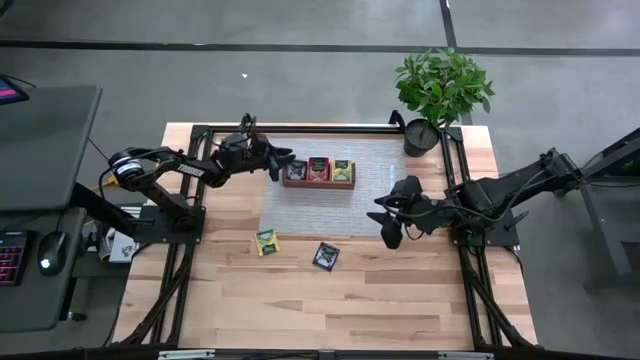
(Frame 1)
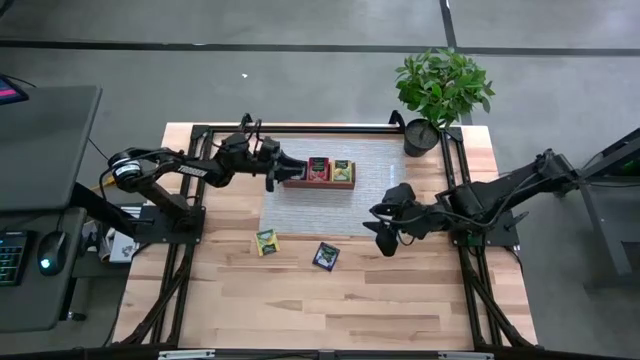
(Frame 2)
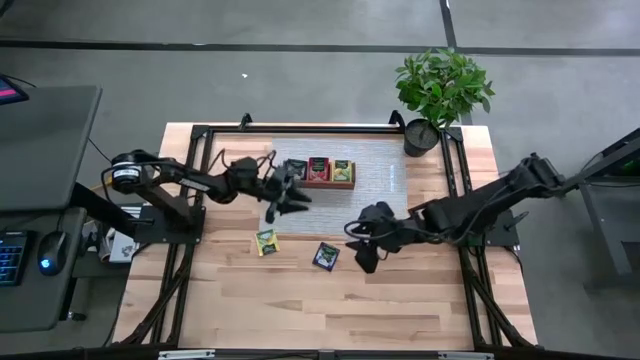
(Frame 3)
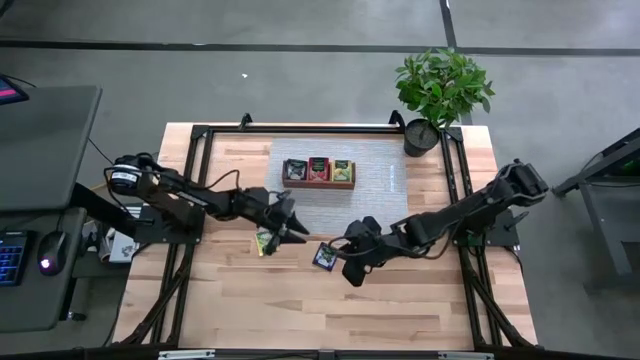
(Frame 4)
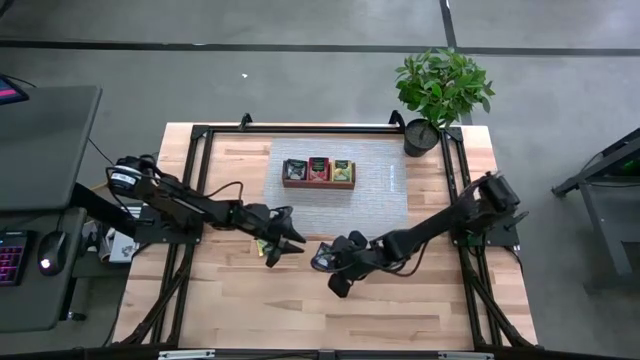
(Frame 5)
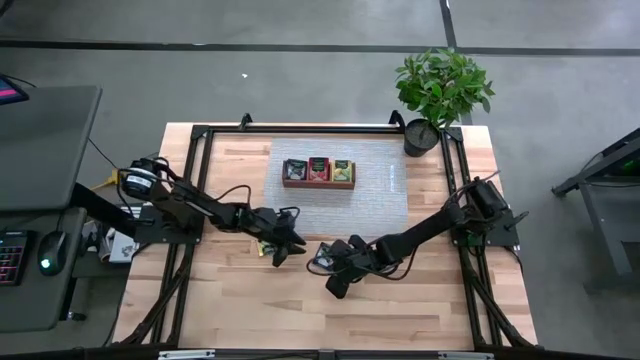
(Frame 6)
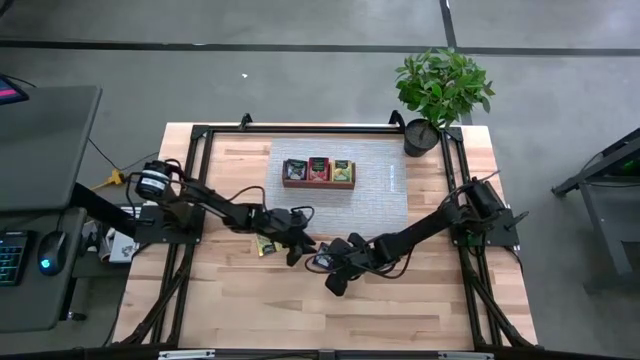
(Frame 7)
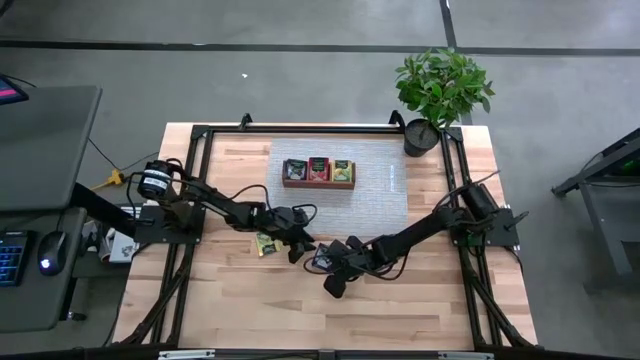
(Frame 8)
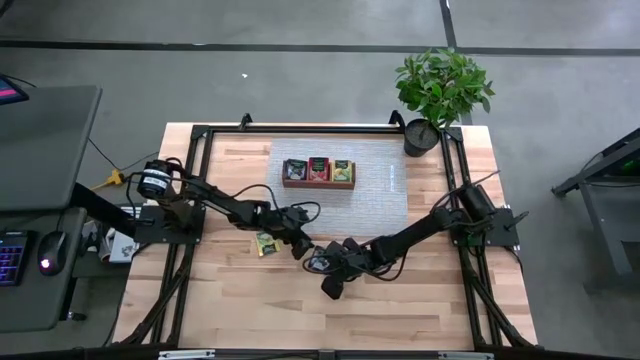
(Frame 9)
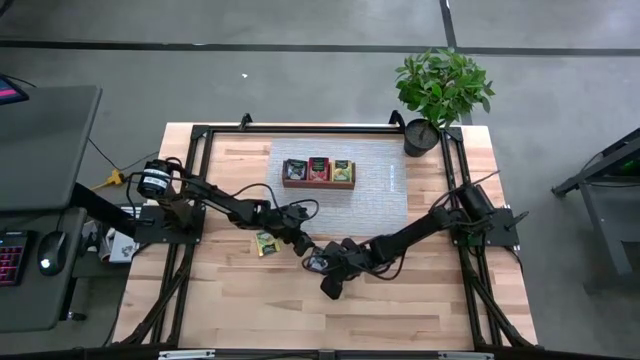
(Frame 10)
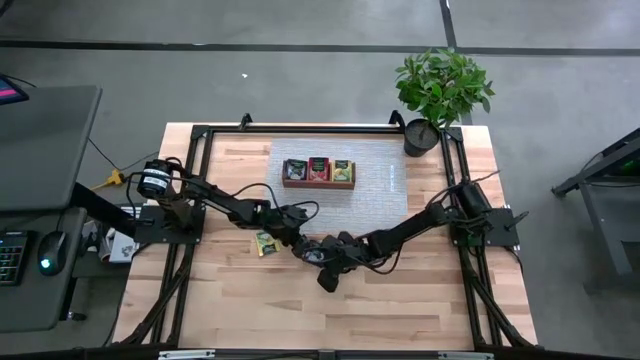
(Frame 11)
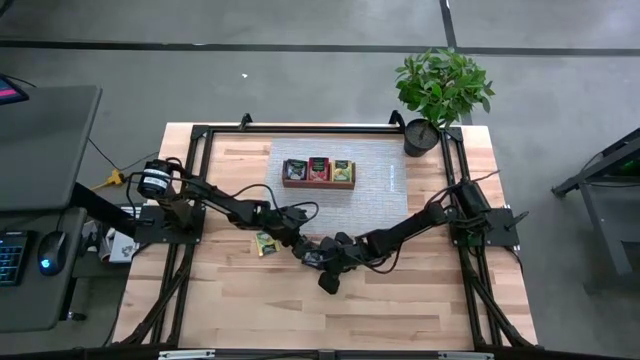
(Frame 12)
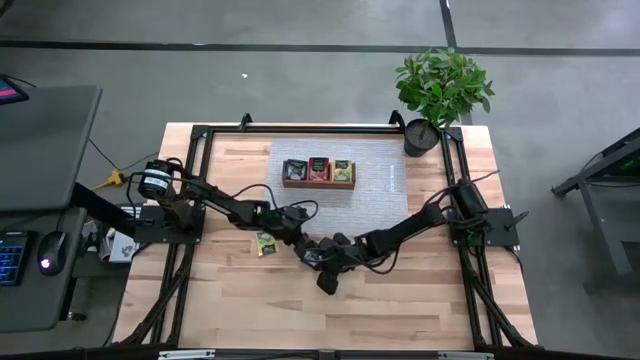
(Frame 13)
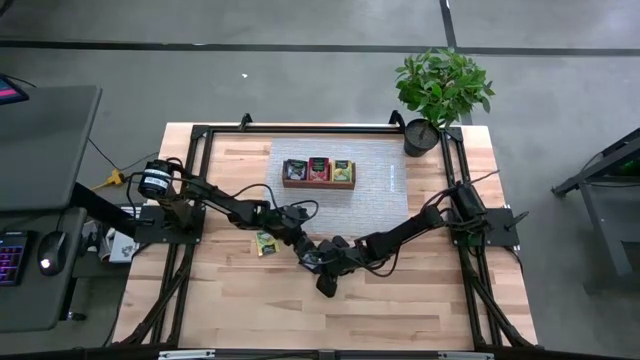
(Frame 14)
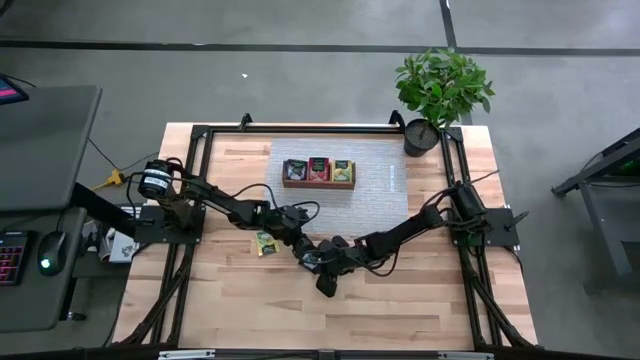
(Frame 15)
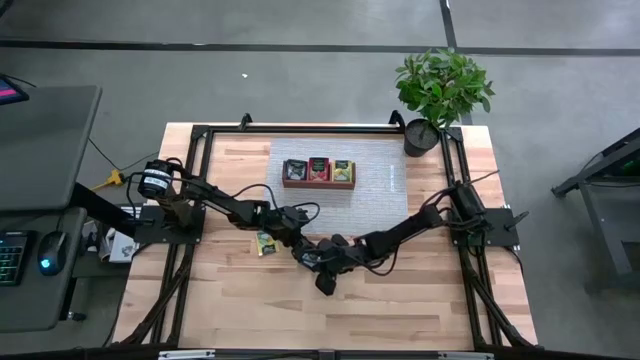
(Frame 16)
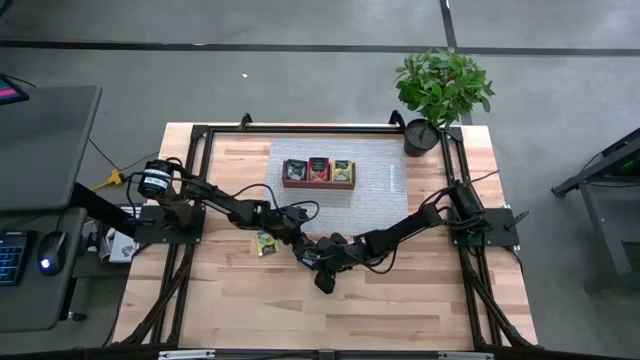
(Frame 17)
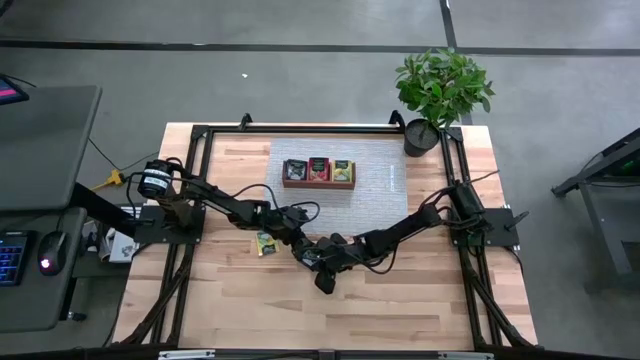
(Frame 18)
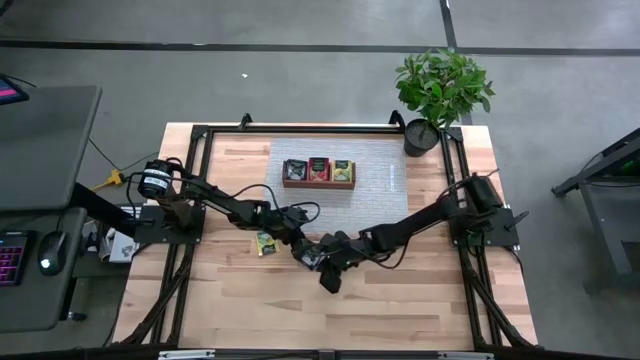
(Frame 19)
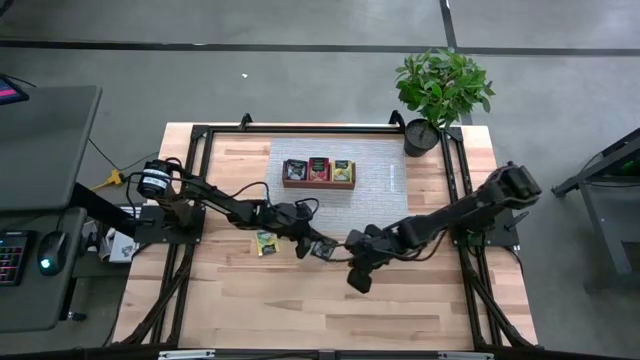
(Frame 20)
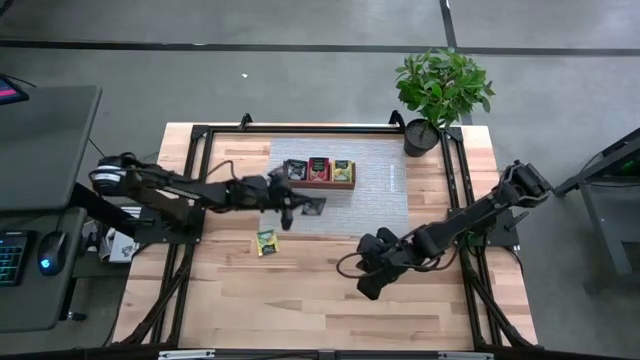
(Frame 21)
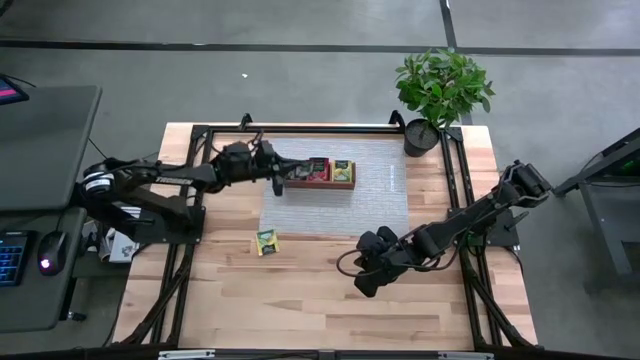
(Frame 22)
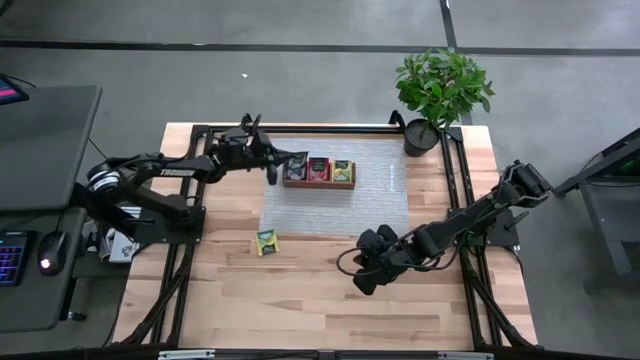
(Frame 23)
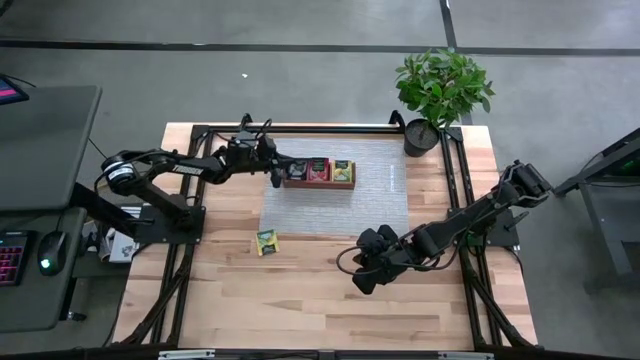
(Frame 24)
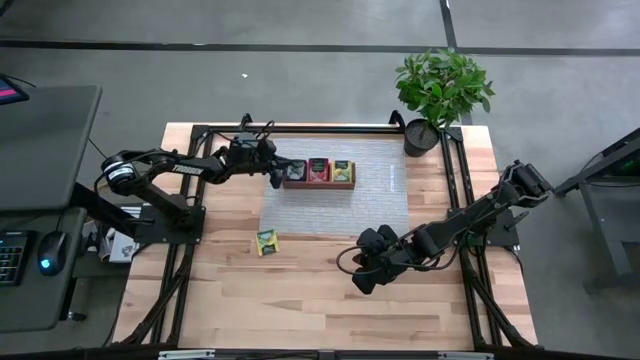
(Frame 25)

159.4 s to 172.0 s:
Task: Pick & Place Tea
Put the purple tea bag into the left section of the wooden organizer

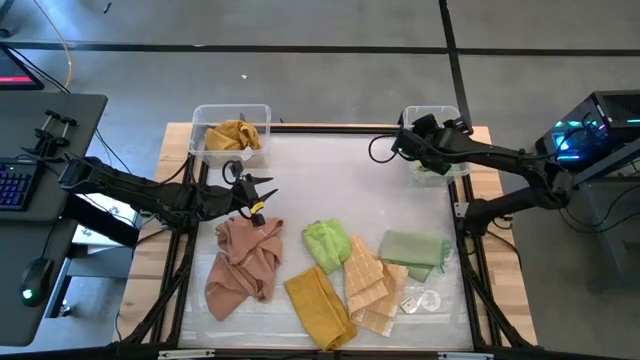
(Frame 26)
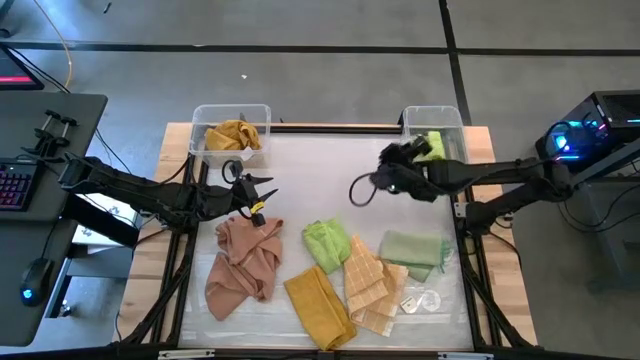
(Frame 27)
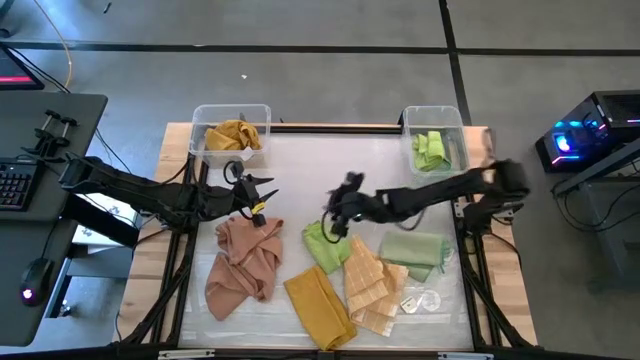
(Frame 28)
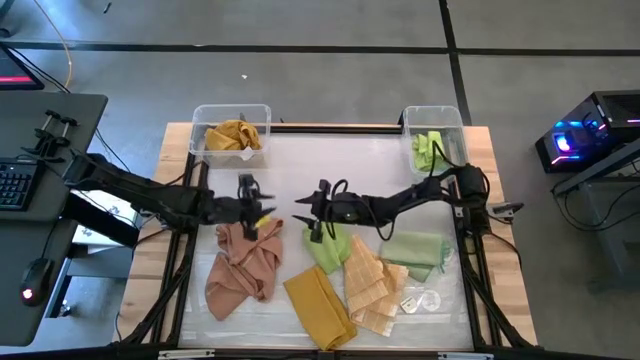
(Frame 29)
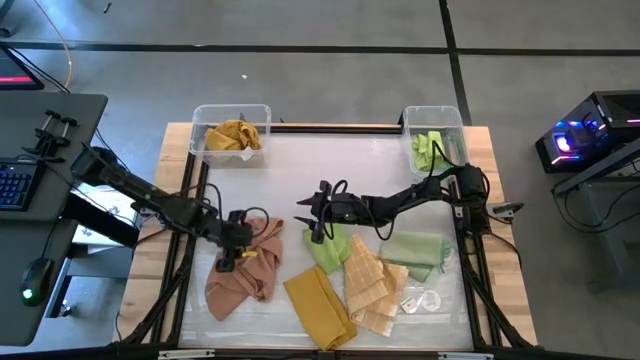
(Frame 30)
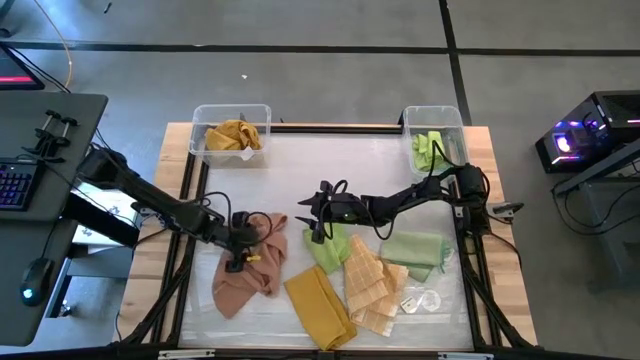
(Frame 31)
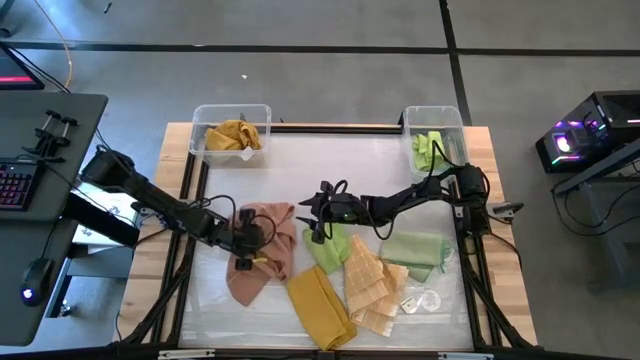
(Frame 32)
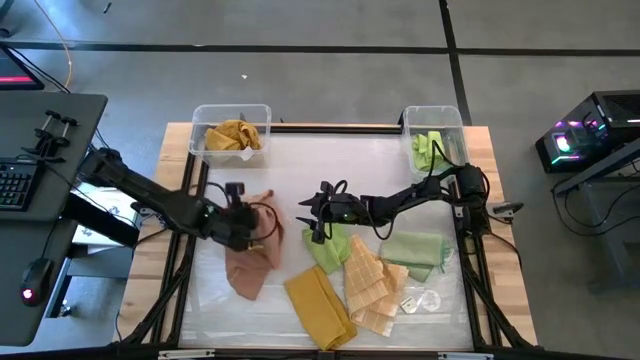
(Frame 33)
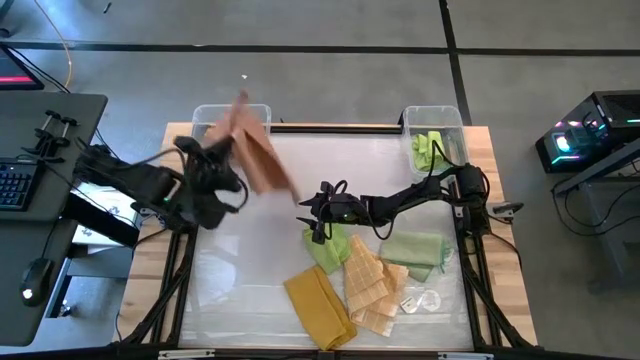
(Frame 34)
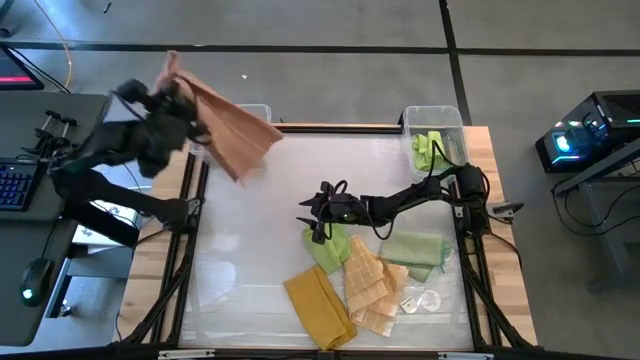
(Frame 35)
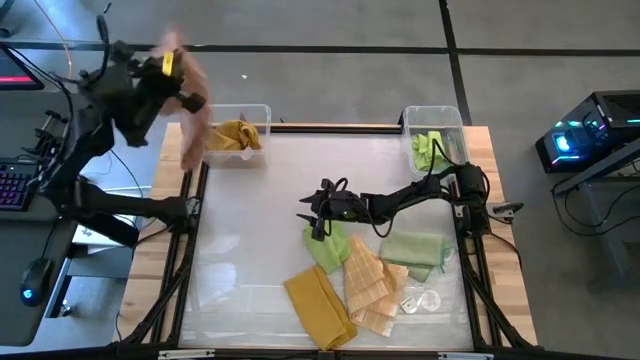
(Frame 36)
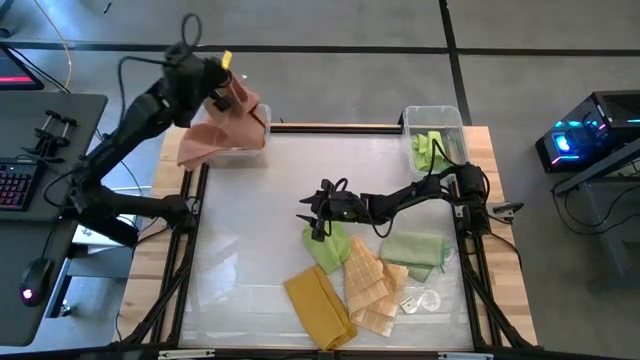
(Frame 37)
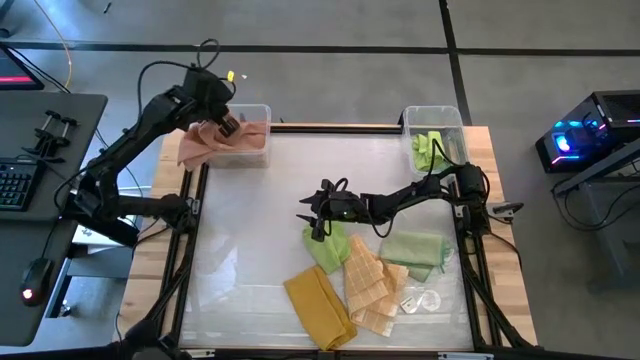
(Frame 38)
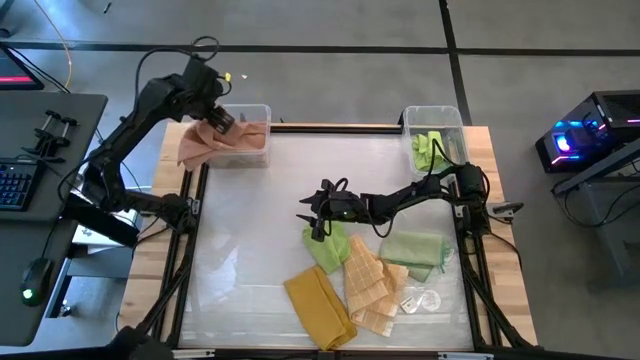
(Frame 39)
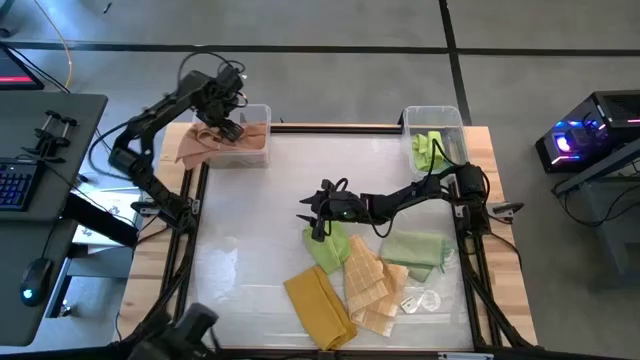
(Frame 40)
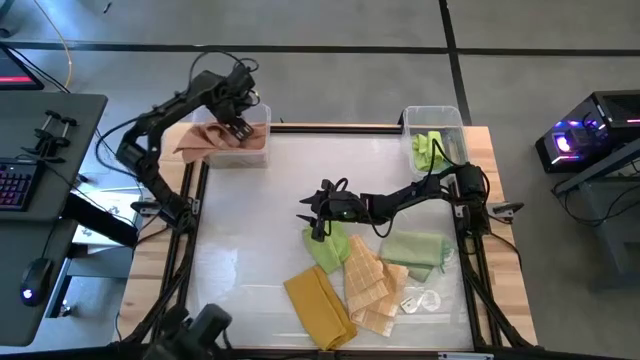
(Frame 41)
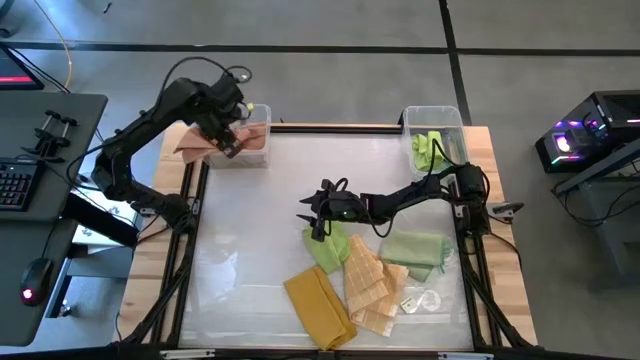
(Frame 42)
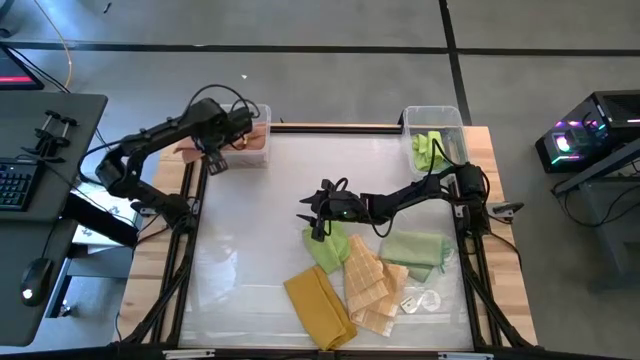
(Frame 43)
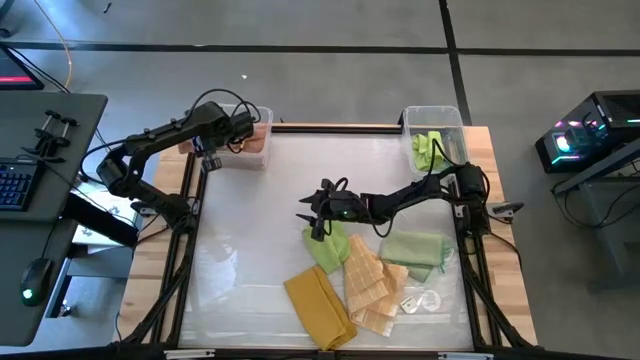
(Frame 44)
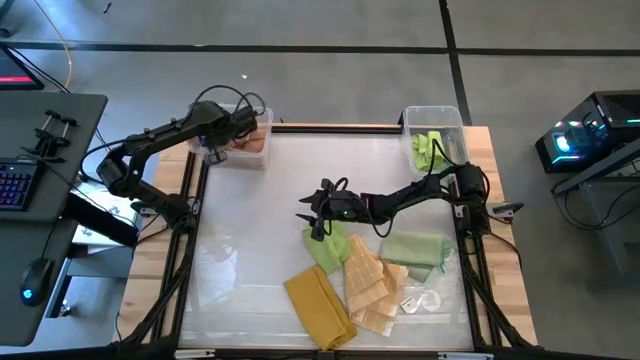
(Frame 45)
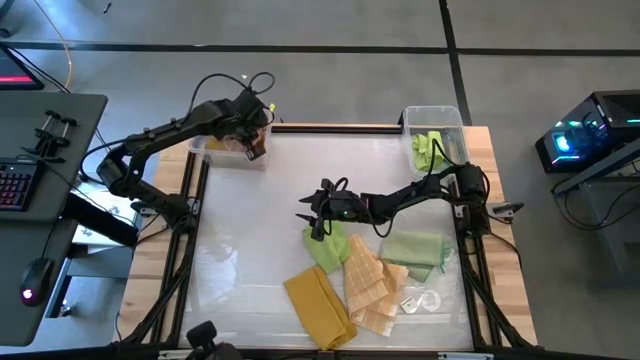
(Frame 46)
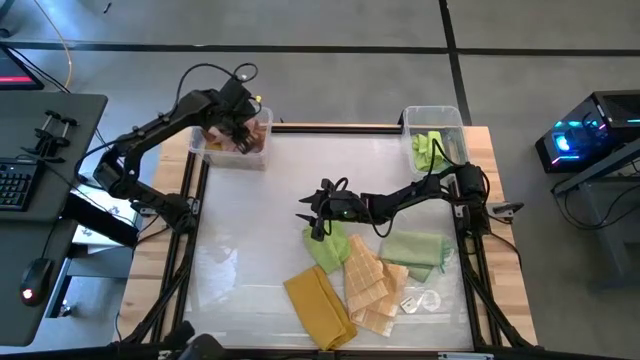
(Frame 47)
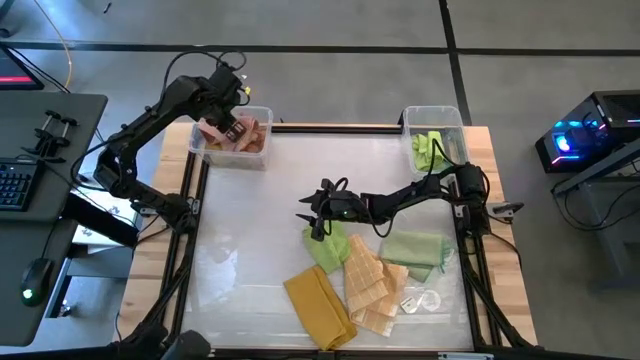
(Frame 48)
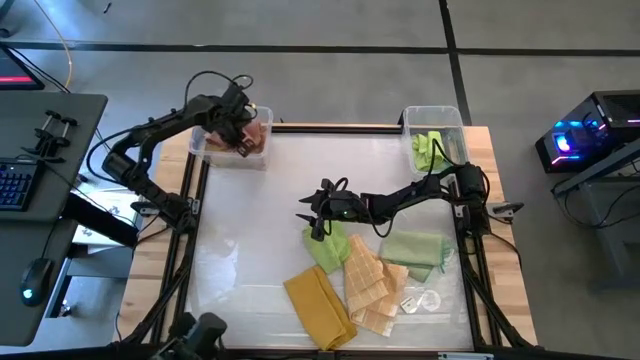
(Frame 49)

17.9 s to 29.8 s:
Task: Sort towels by color in basket
Put the brown microfiber cloth into the left transparent bin
